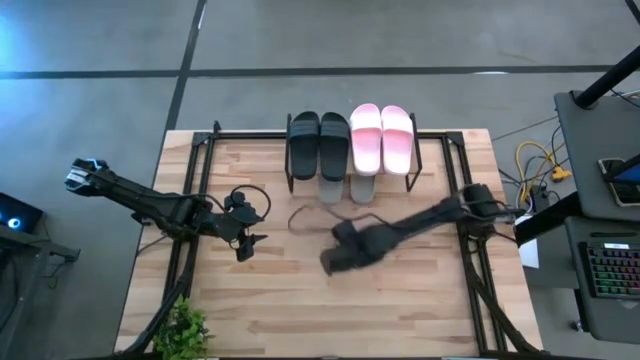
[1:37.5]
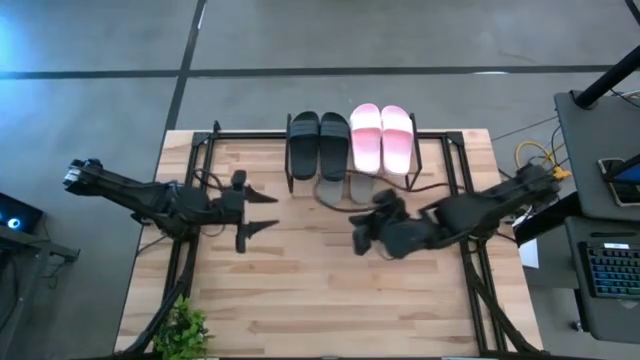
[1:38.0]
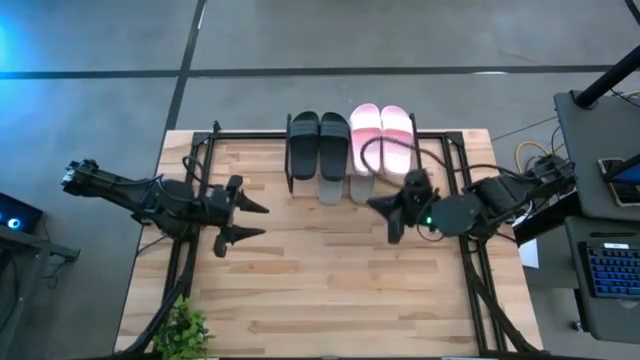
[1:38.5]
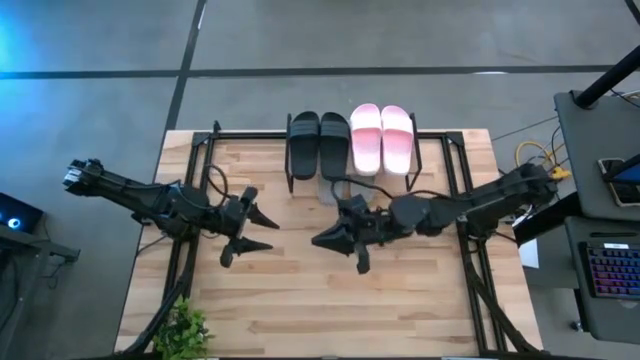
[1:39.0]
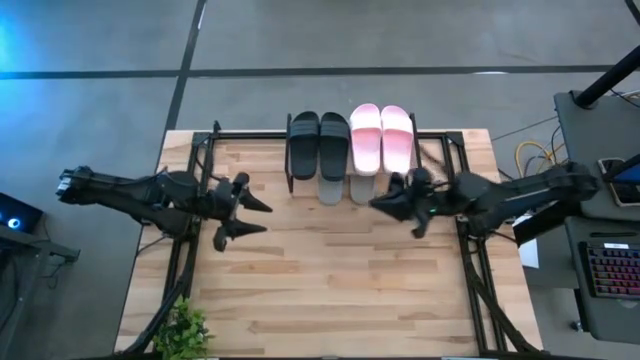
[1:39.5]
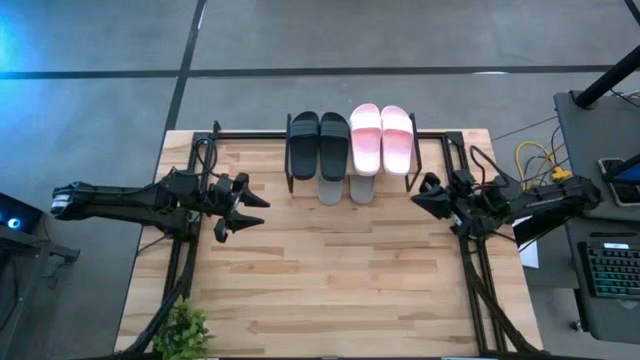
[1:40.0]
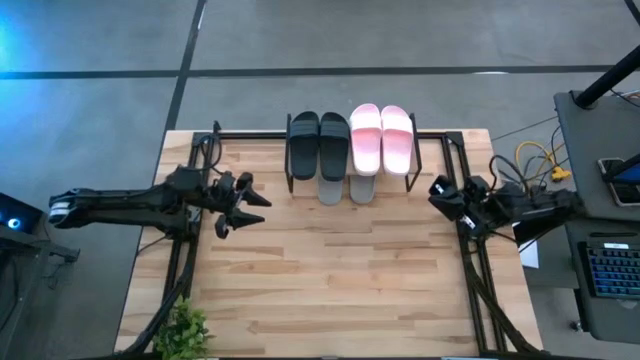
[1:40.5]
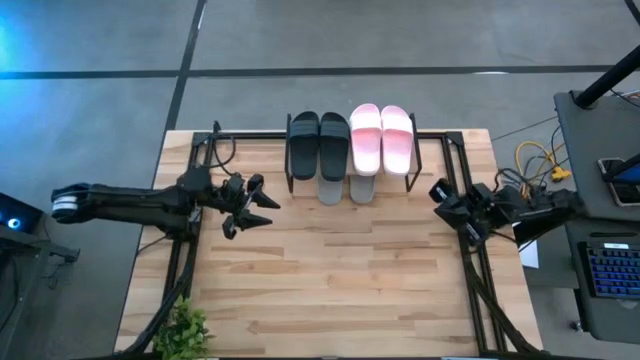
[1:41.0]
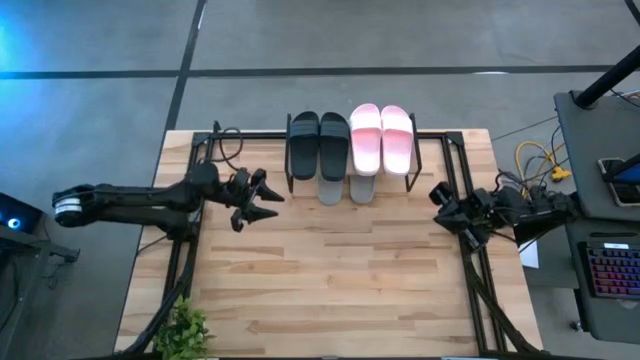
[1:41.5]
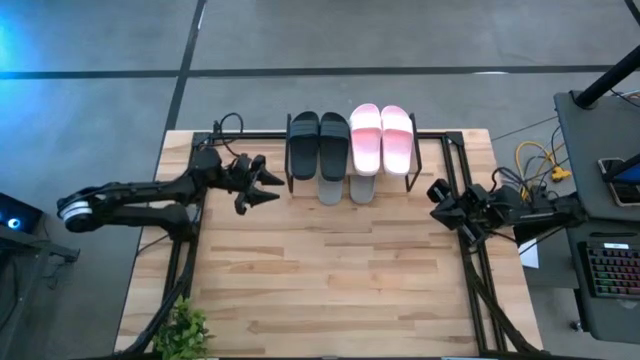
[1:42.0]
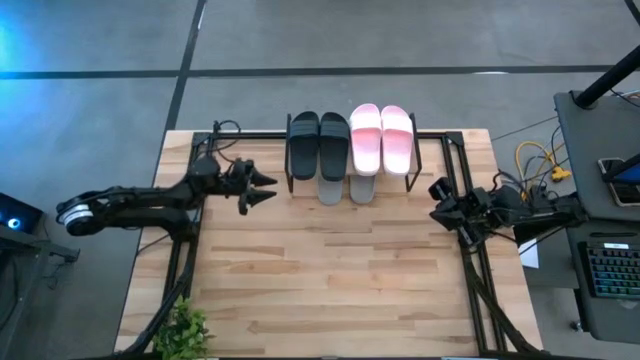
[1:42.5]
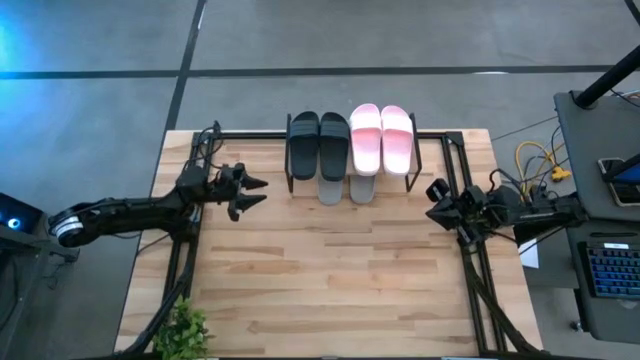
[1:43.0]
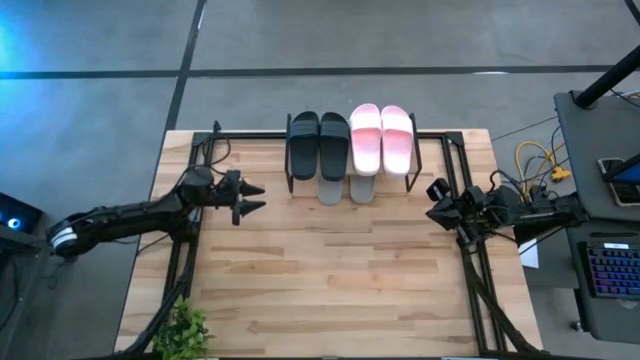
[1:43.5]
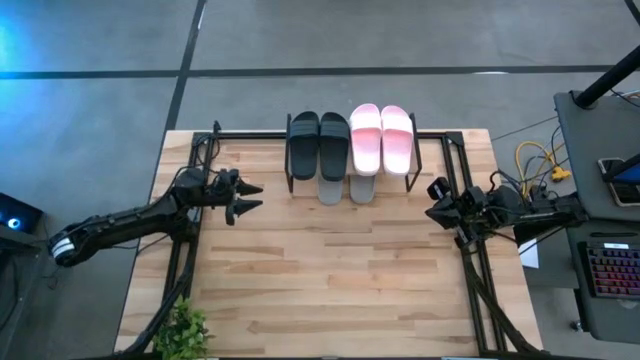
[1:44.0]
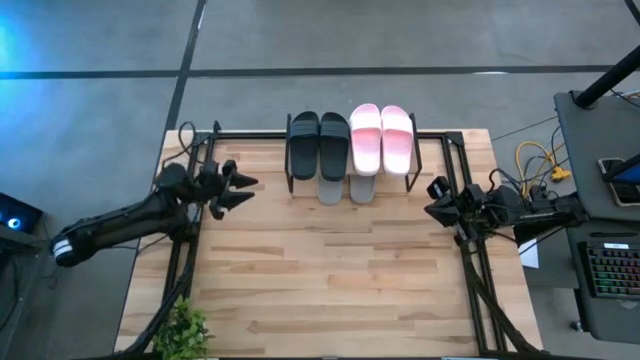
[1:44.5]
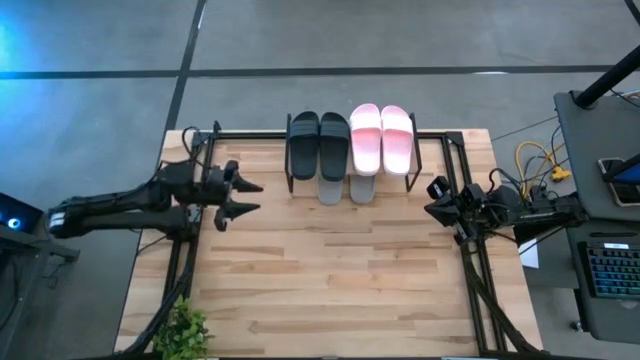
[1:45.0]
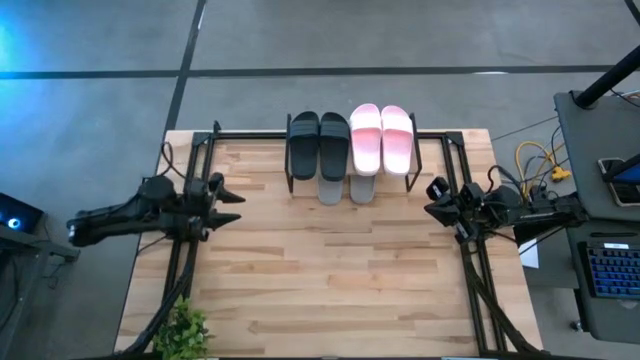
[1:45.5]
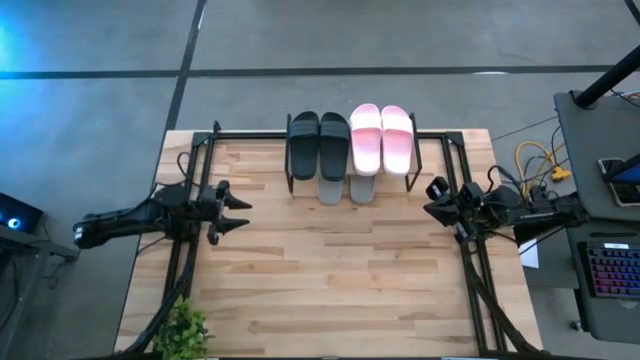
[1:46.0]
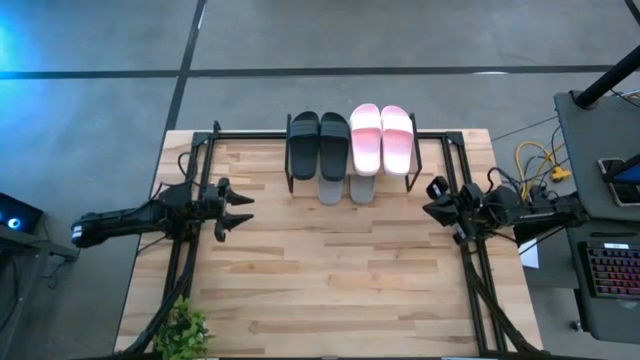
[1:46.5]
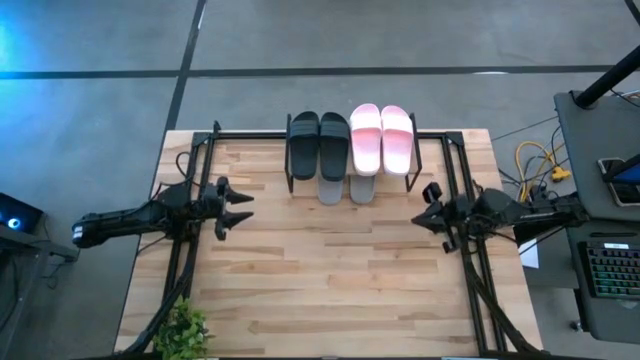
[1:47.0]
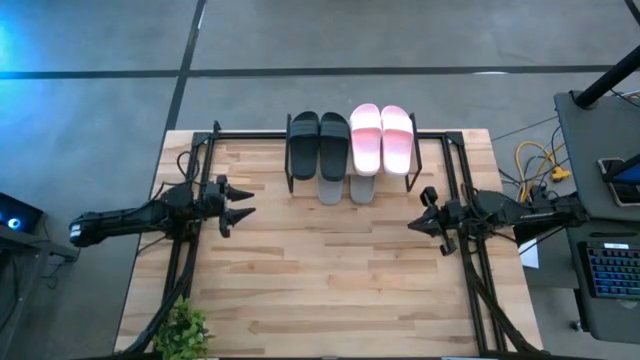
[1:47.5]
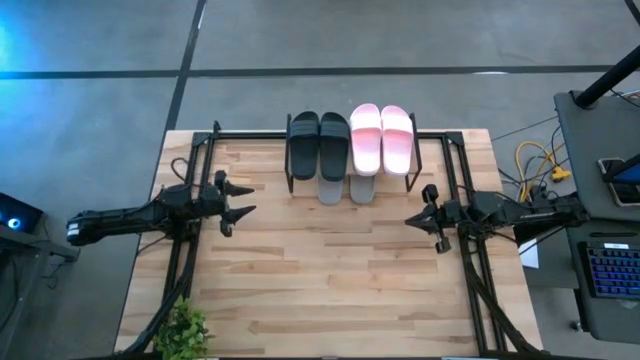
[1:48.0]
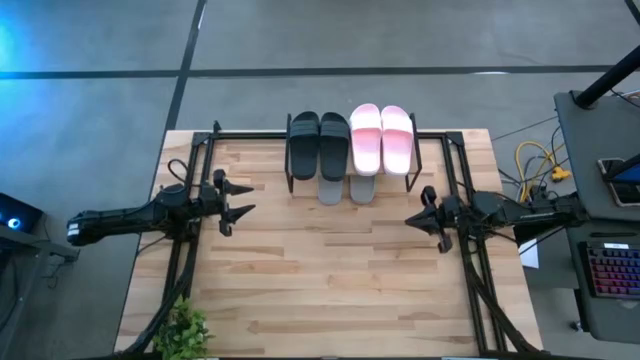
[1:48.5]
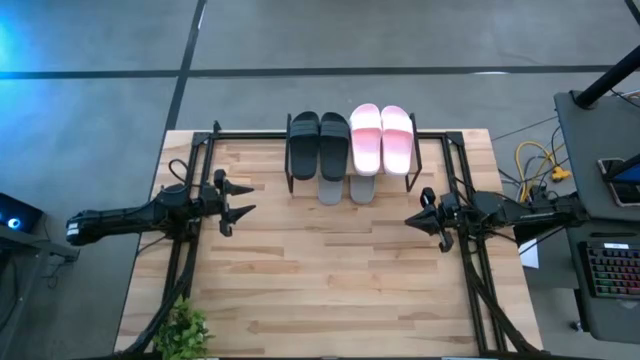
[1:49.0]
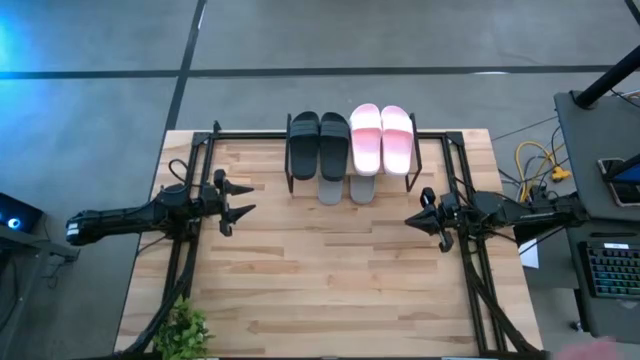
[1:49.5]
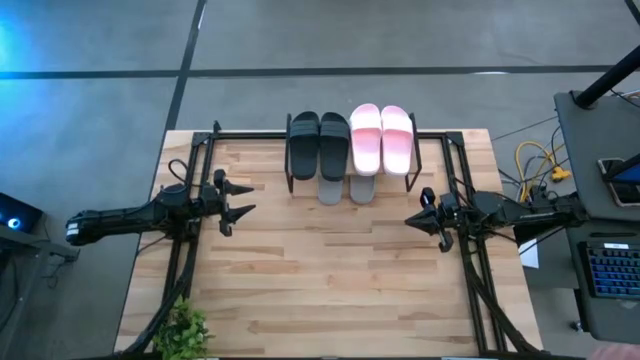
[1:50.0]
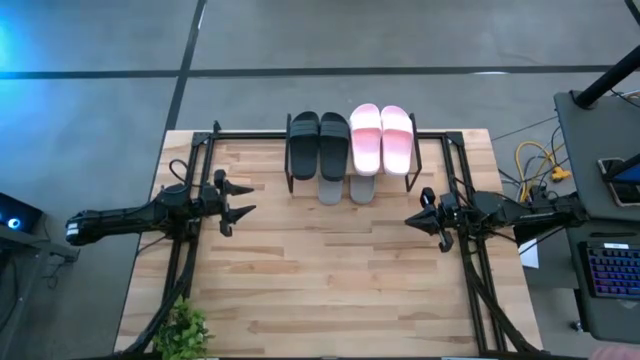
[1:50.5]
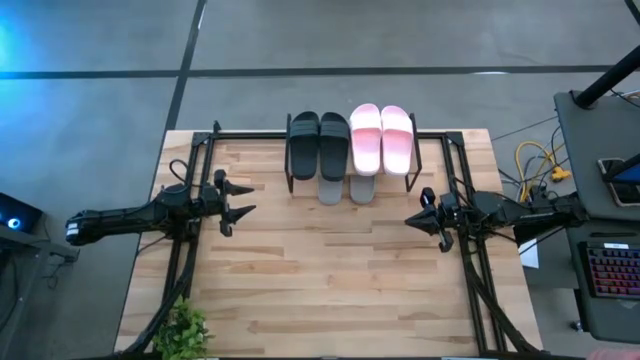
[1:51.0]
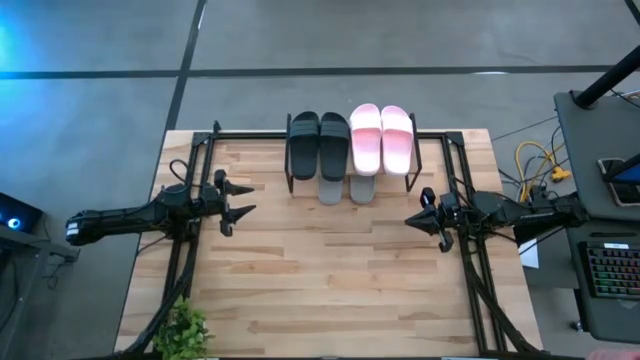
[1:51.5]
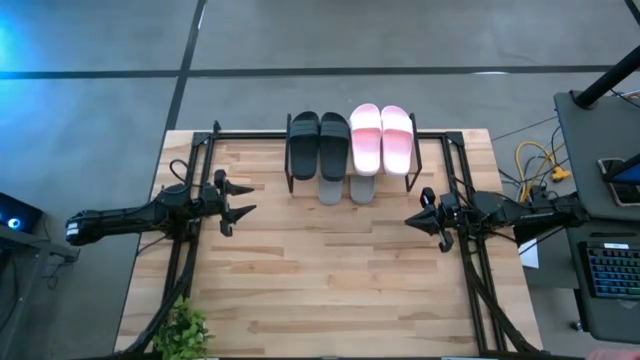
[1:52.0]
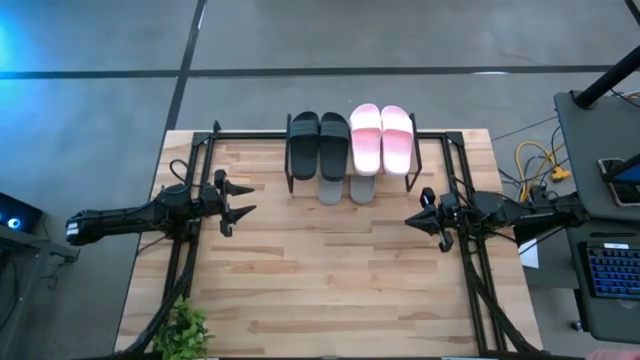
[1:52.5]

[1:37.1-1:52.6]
Task: Pick and place slides into the shelf
Return to Home Position

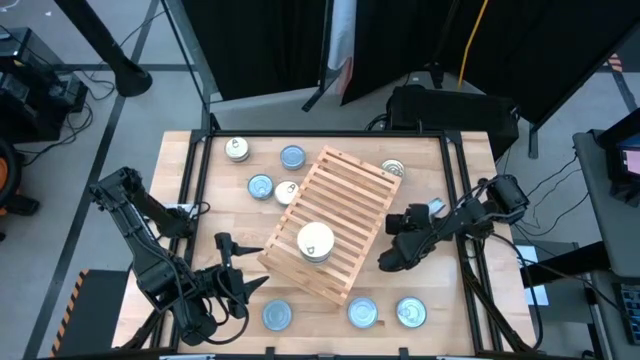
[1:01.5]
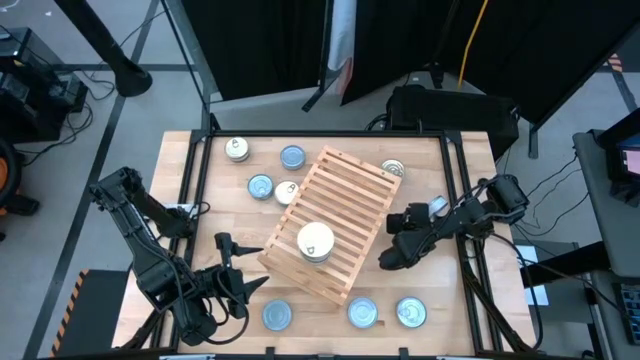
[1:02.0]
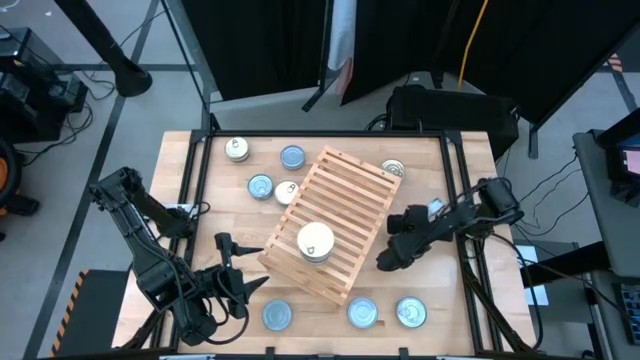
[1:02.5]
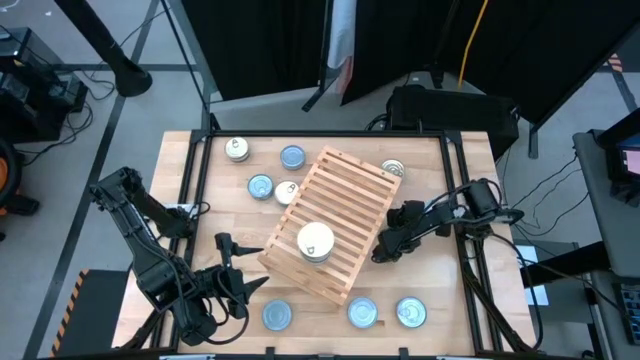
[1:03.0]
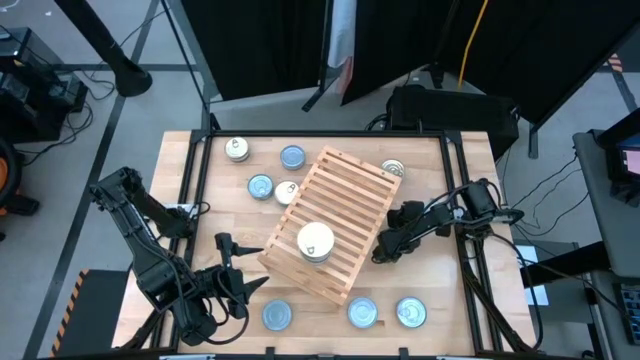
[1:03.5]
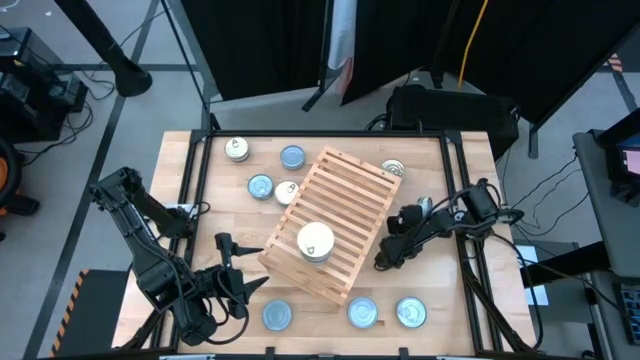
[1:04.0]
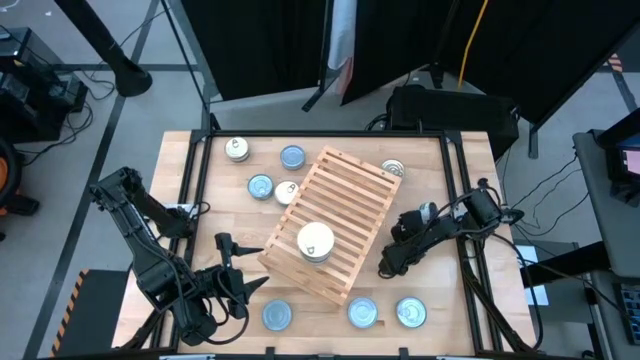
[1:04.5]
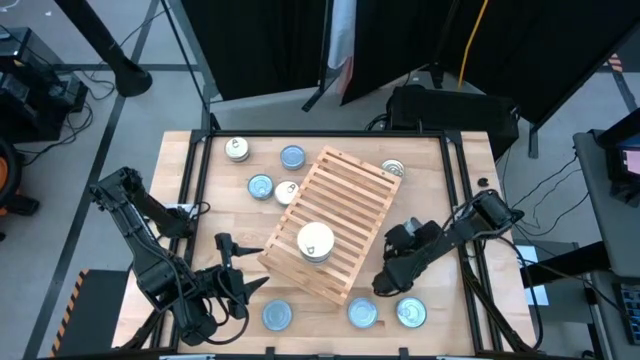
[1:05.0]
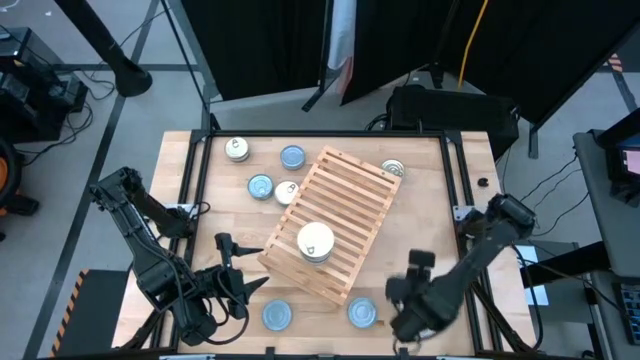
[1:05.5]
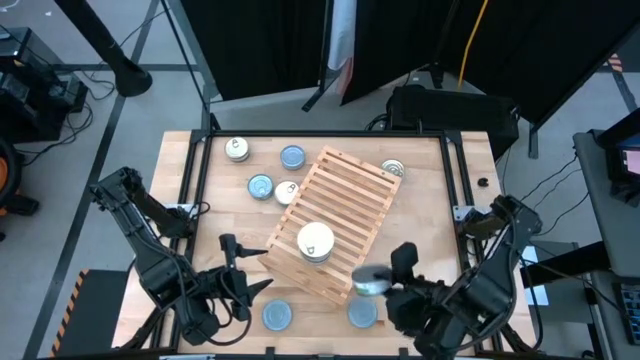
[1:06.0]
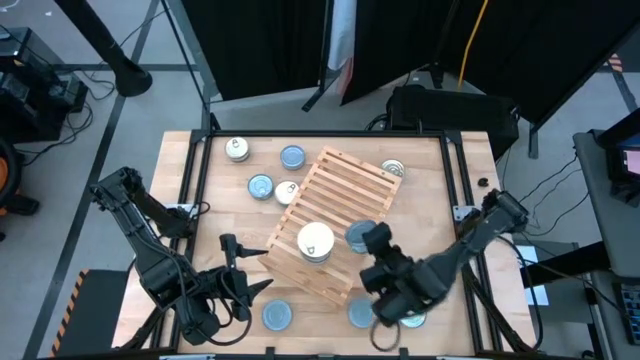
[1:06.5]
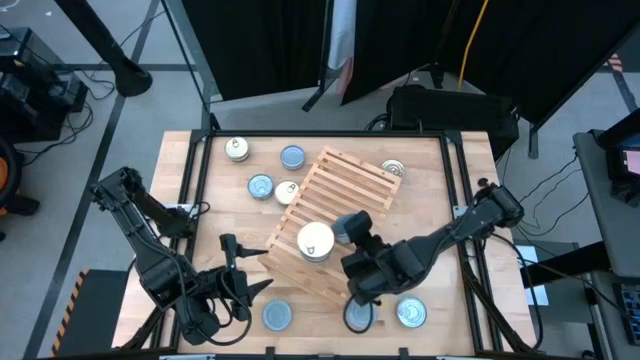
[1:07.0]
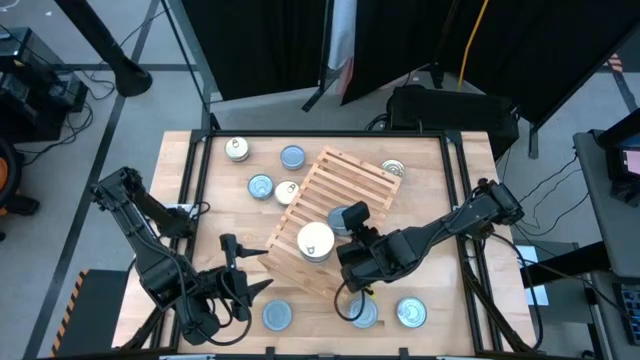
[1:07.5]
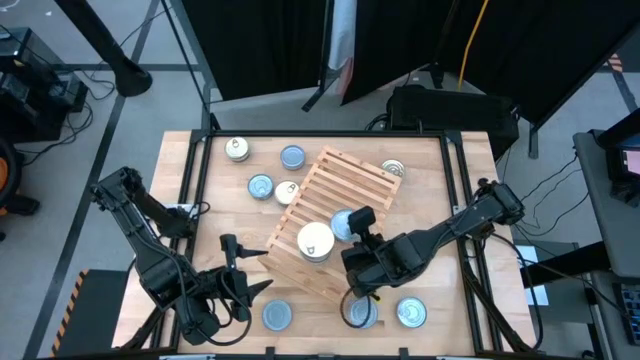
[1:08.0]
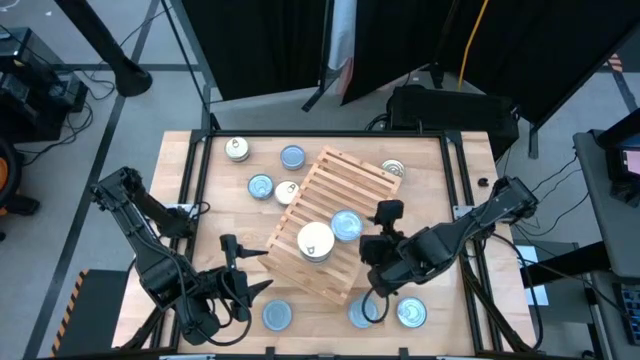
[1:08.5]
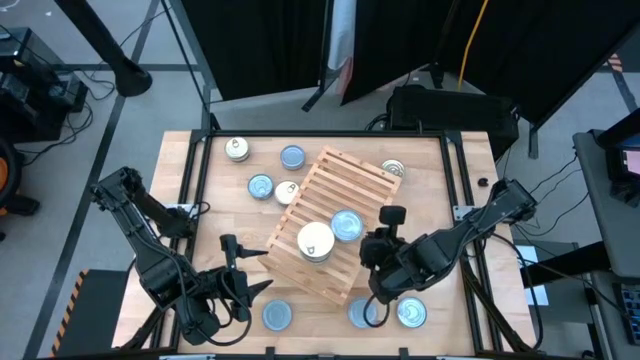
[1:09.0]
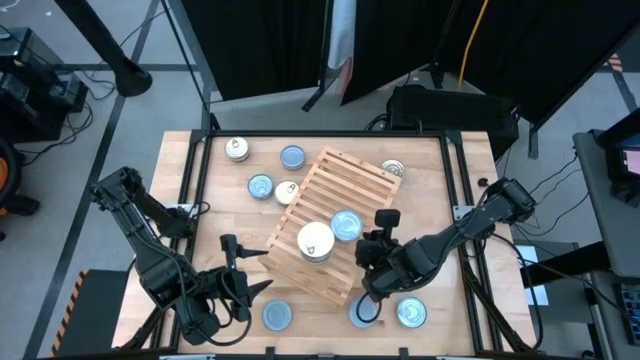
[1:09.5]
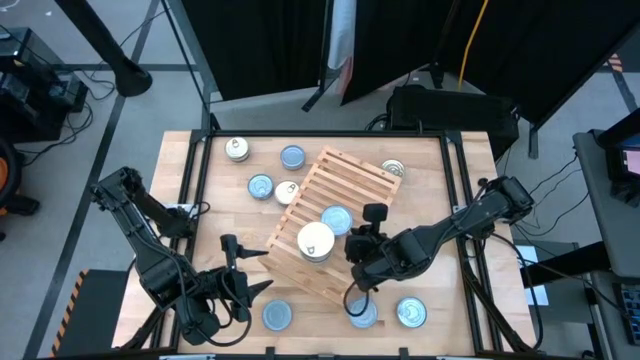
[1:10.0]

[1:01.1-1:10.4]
Task: Stack canned seafood by type on shelf
Put the green tuna can on the shelf
